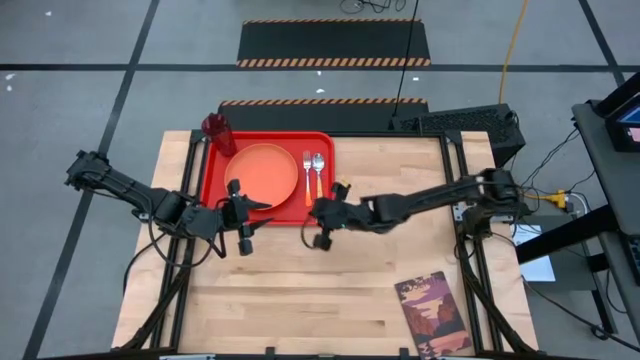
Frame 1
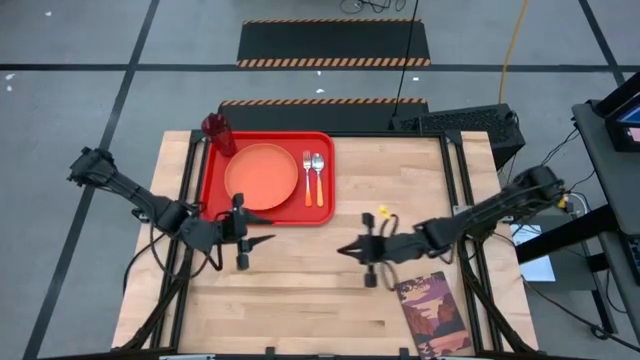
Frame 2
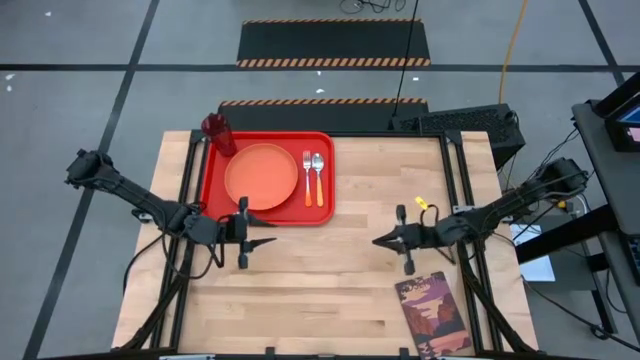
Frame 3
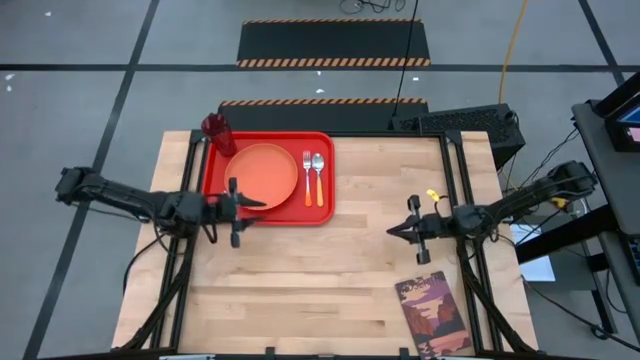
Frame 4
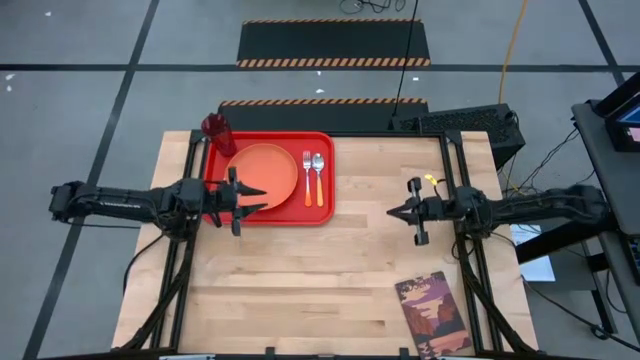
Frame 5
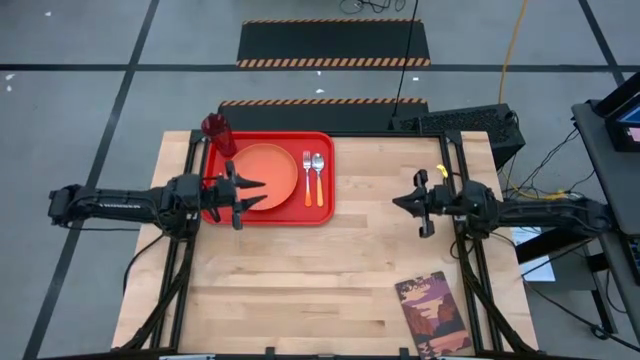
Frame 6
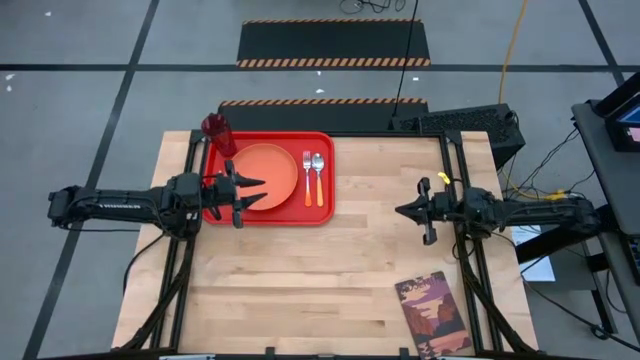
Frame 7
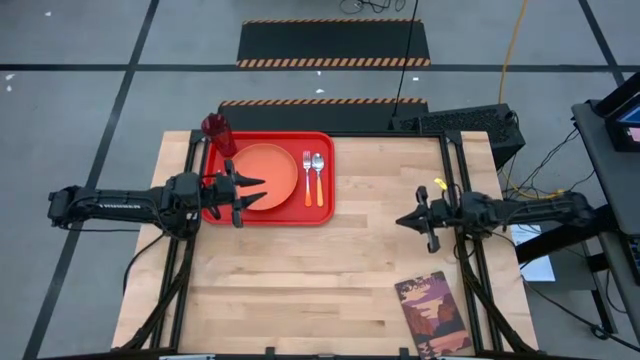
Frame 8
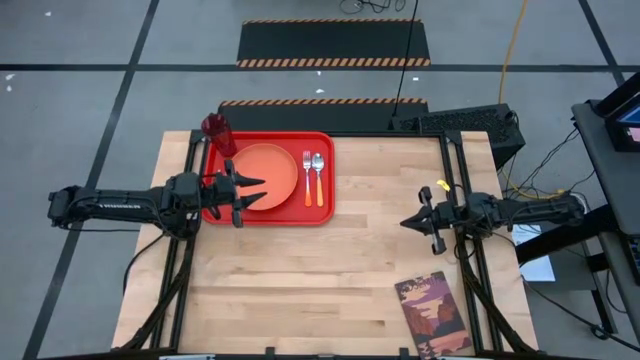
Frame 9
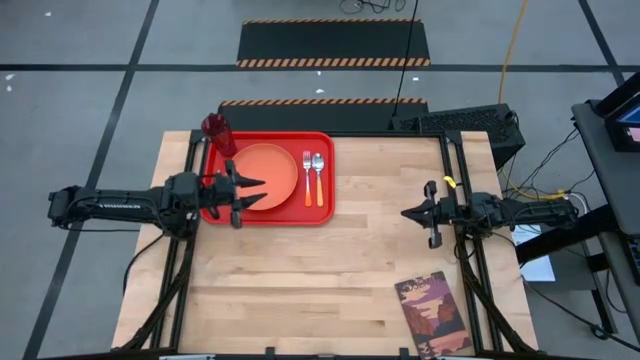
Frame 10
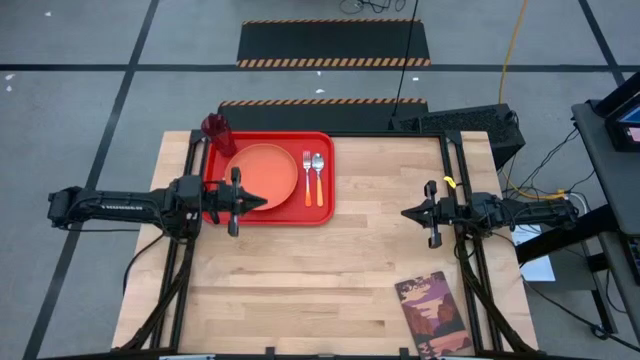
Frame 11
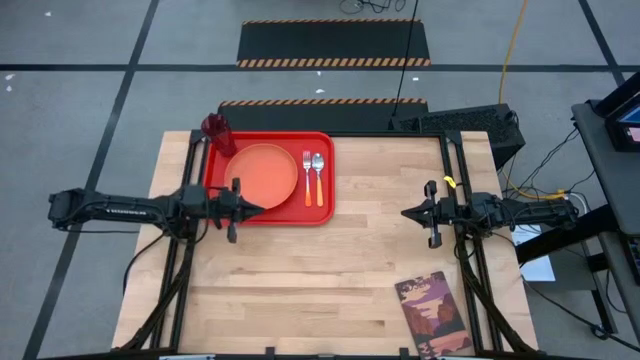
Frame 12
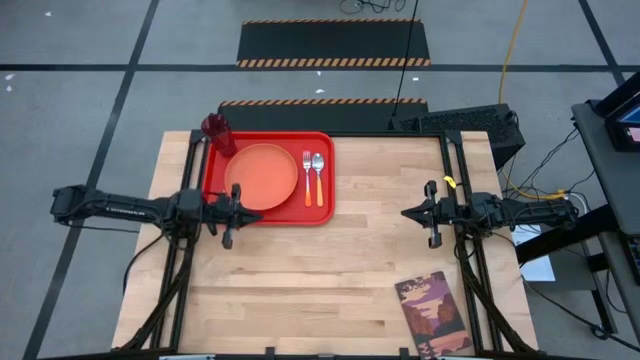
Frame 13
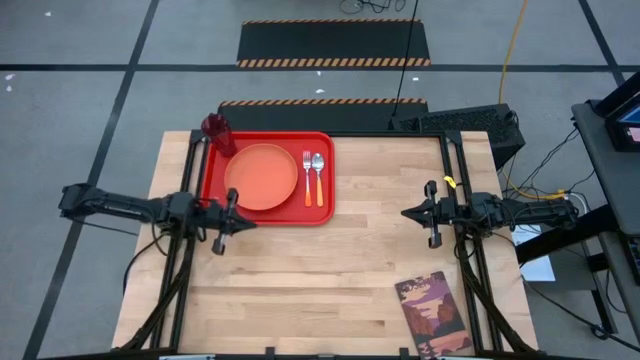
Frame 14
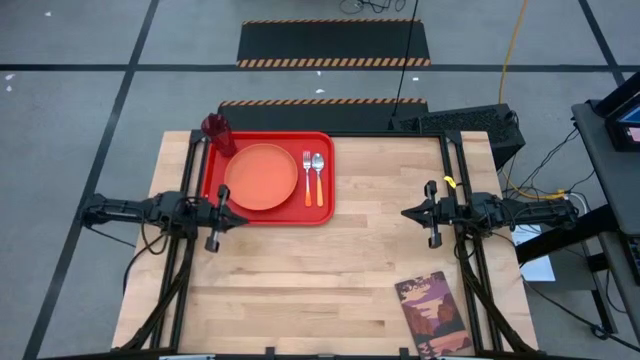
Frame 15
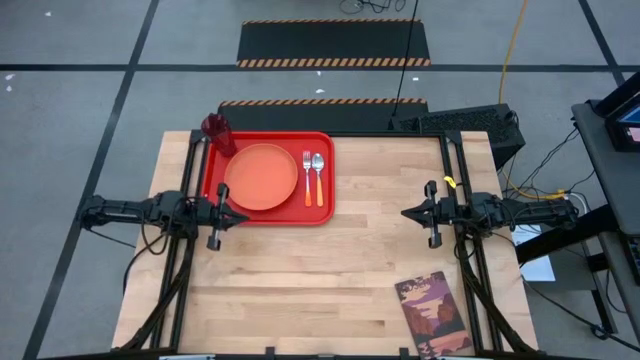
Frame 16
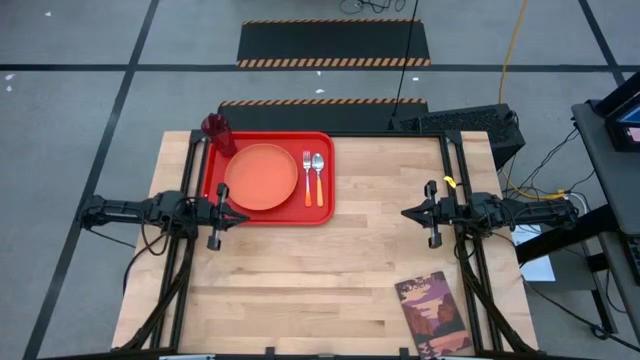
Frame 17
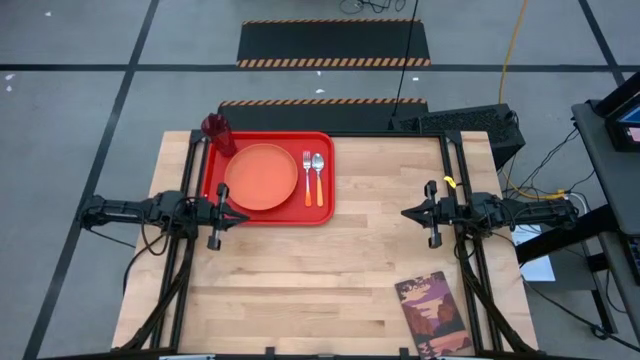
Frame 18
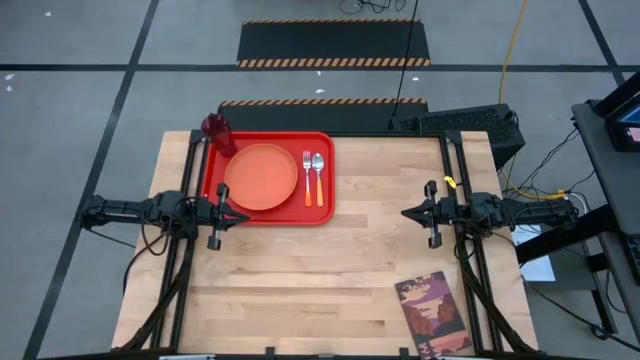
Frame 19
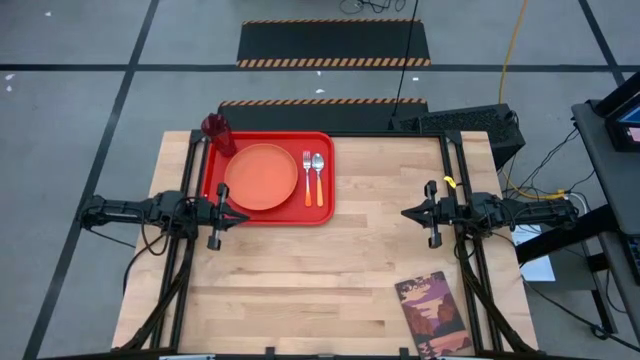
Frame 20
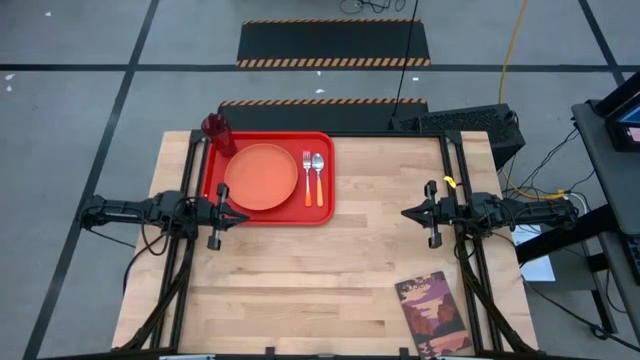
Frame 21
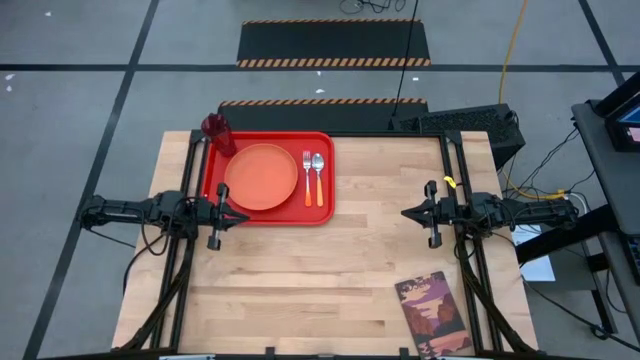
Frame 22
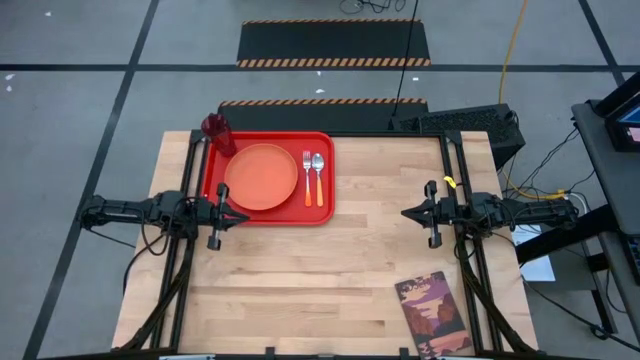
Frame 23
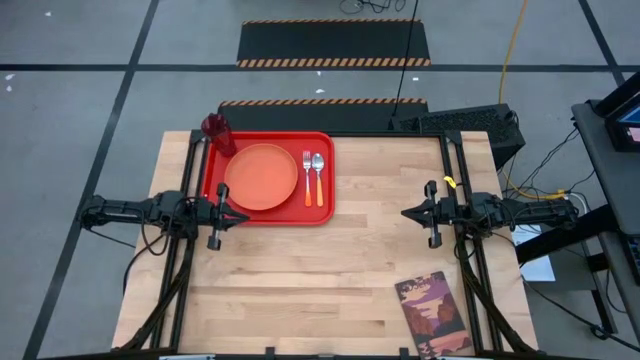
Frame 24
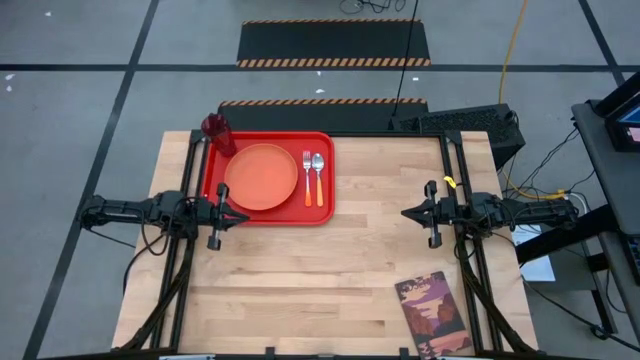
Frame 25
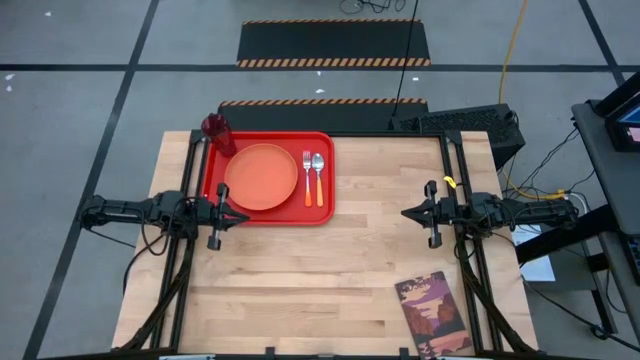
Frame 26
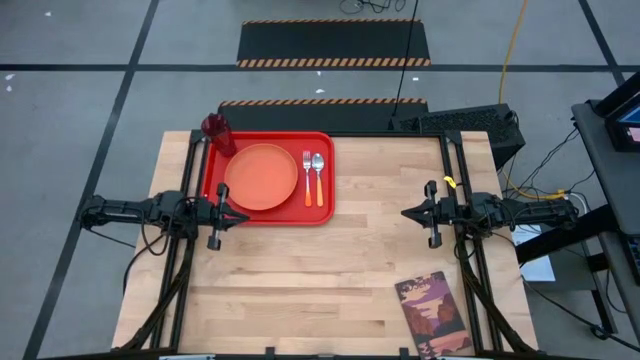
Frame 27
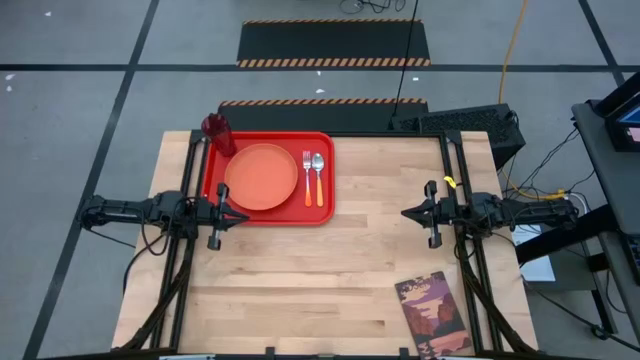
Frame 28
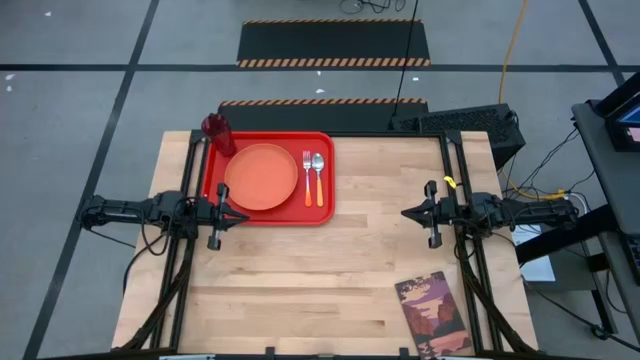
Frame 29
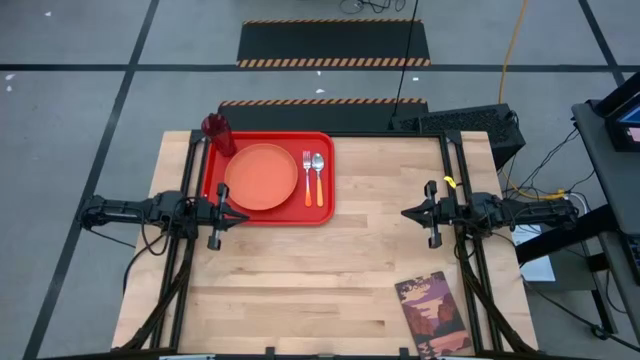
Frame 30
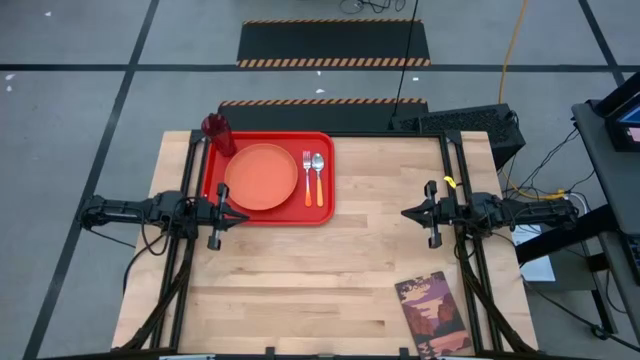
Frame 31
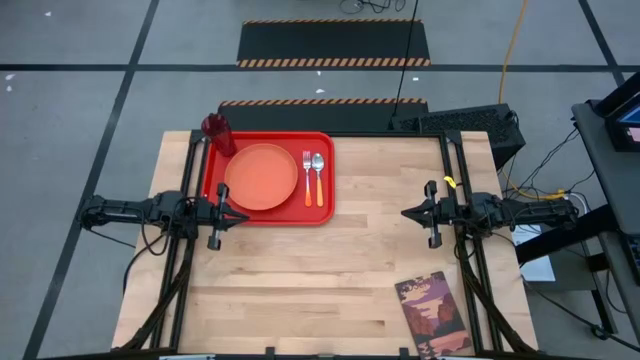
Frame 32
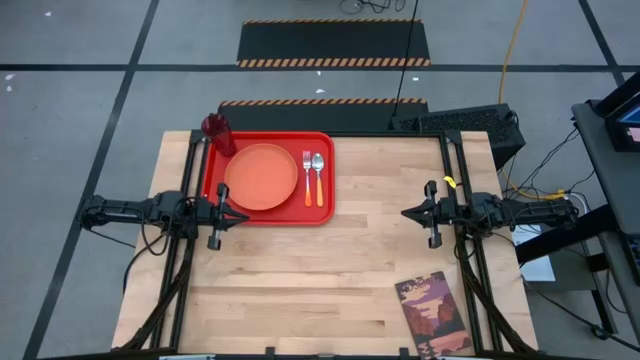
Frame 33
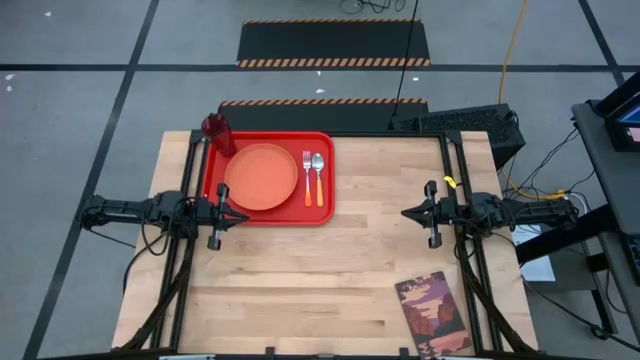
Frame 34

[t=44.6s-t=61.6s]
Task: Pick and place plate/cup/fork/spoon on tray
Return to Home Position

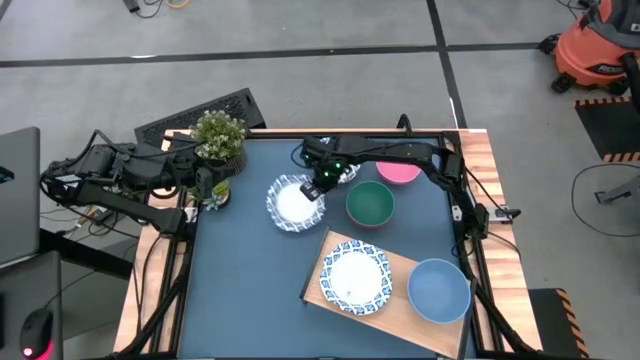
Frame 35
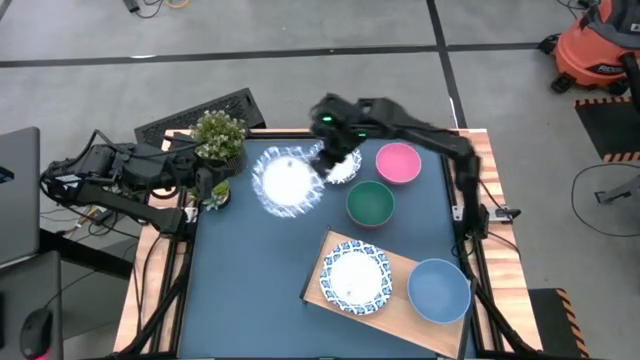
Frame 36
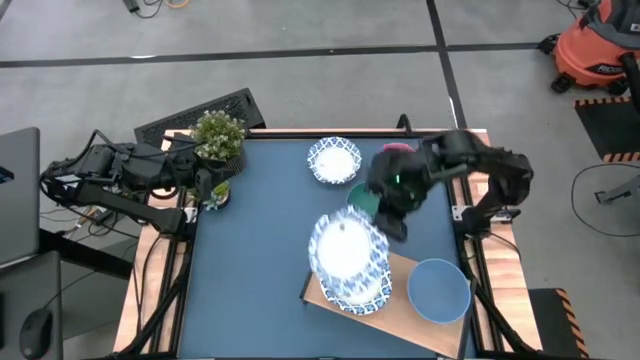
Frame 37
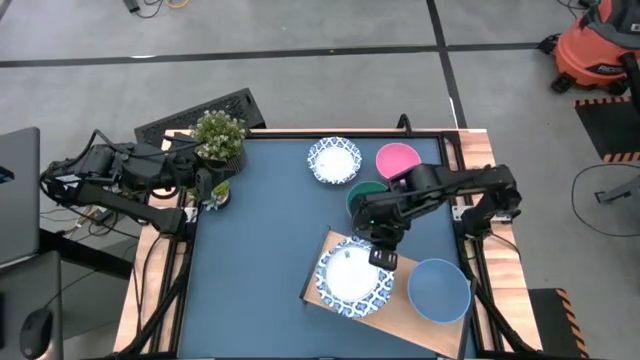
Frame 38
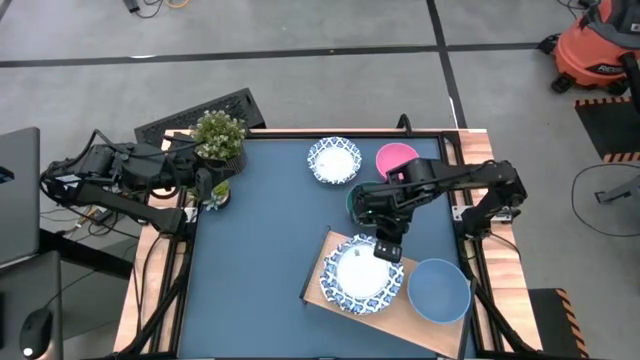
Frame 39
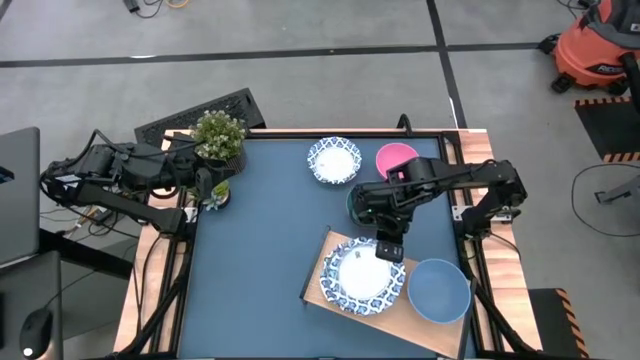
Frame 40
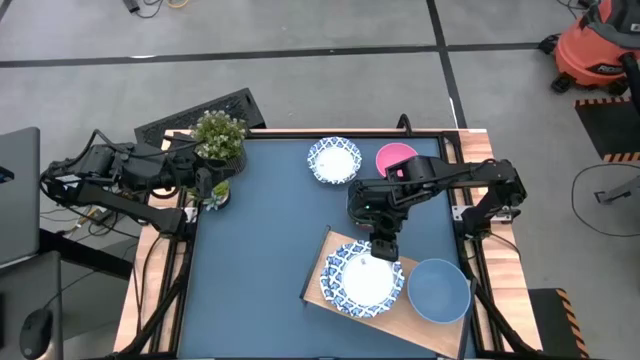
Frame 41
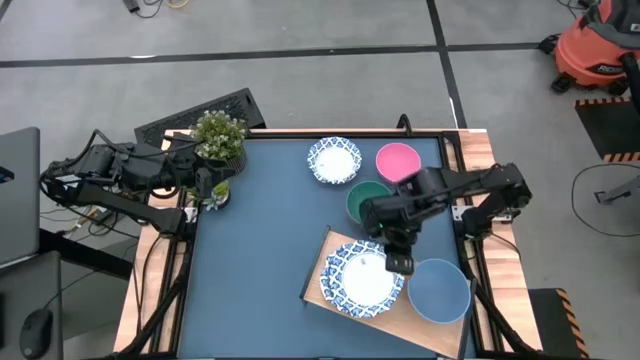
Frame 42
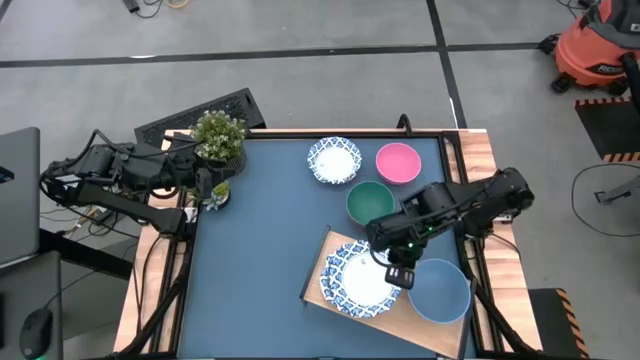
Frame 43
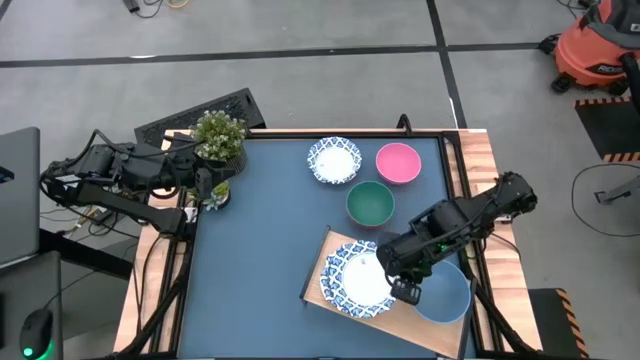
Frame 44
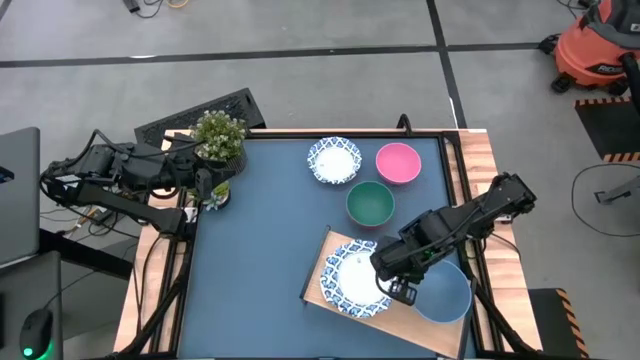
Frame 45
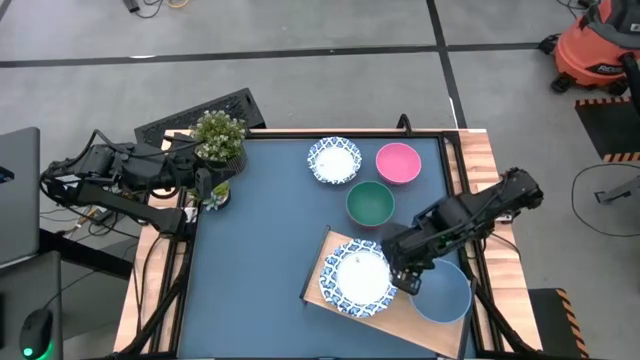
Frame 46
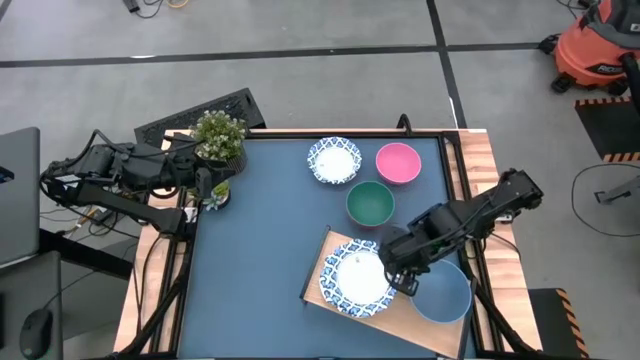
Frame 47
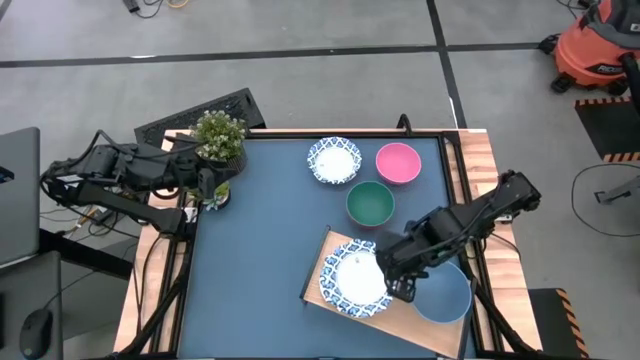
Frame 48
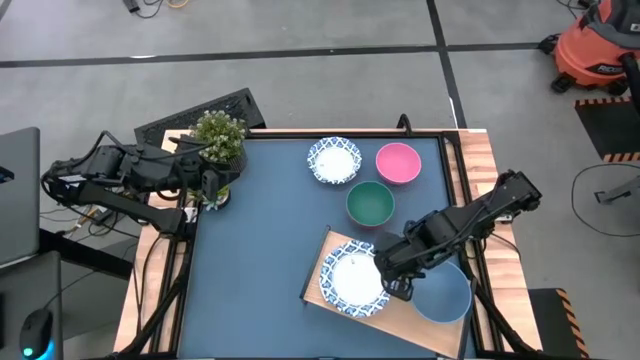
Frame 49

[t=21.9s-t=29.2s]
Task: Place and stack bowls onto a shelf
Stack the white bowl on top of the white bowl on the shelf
